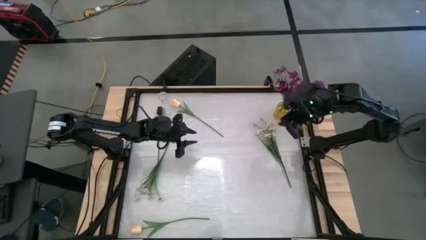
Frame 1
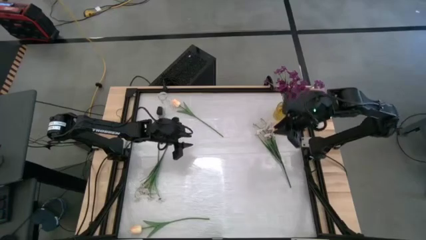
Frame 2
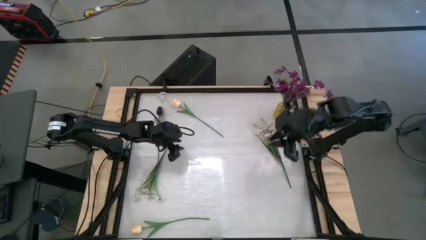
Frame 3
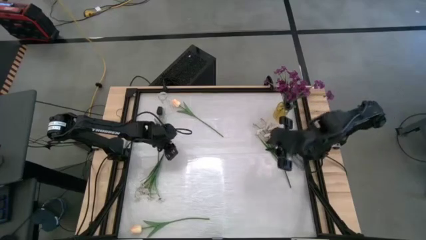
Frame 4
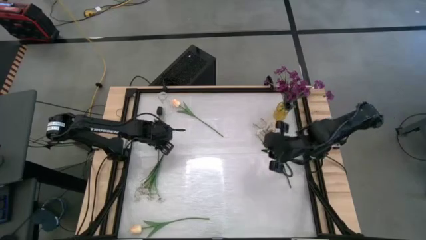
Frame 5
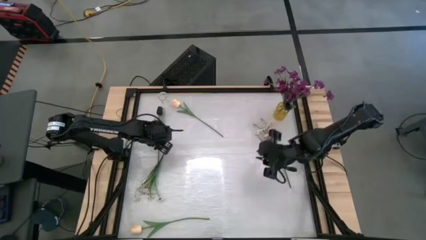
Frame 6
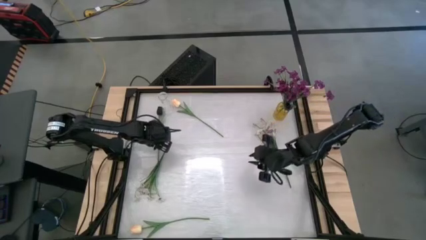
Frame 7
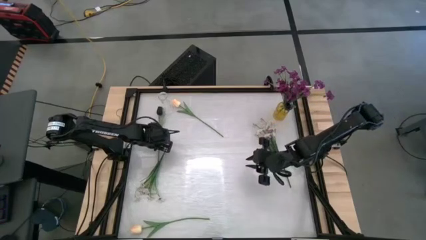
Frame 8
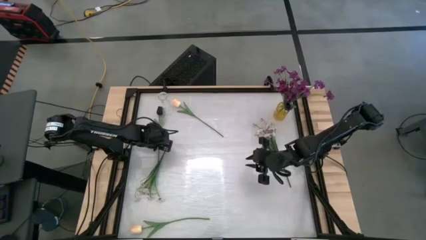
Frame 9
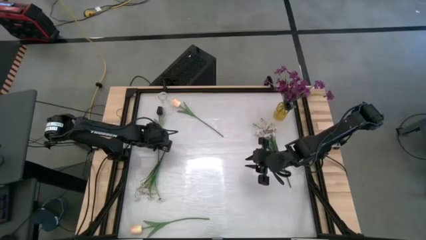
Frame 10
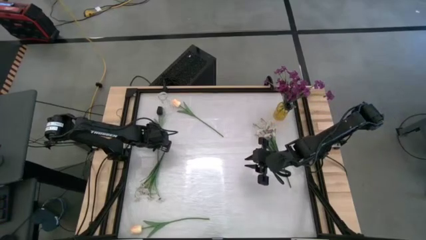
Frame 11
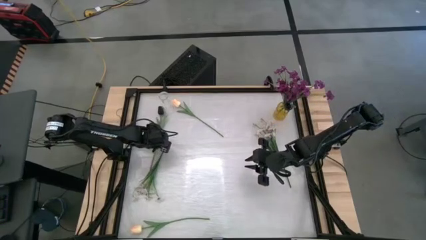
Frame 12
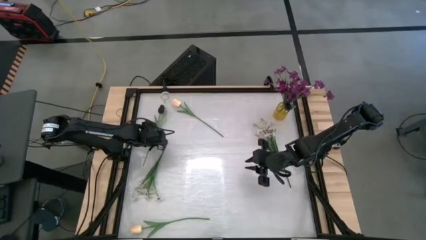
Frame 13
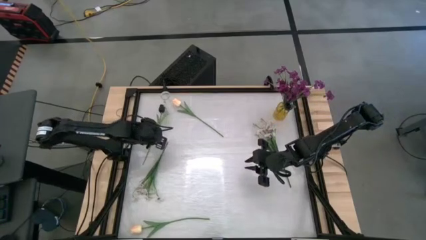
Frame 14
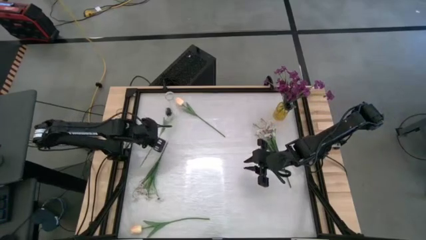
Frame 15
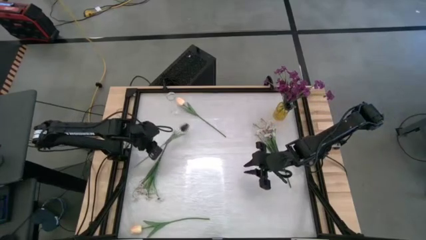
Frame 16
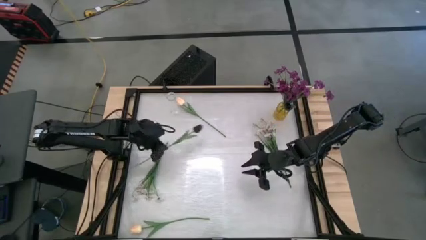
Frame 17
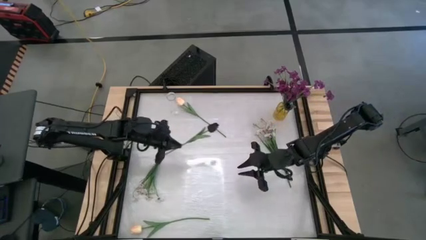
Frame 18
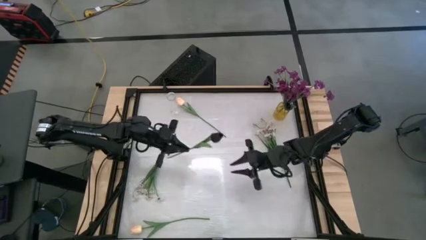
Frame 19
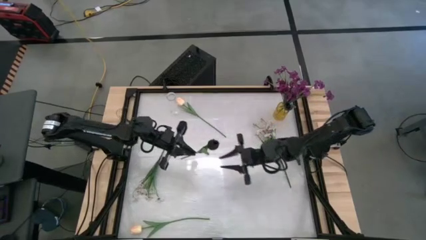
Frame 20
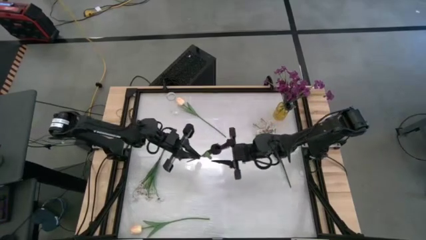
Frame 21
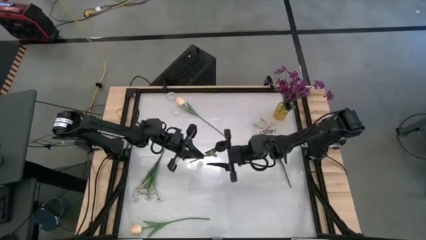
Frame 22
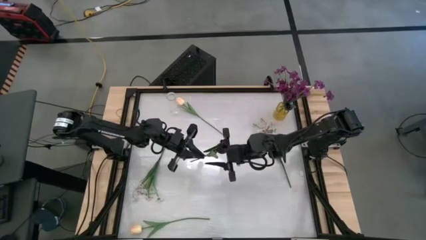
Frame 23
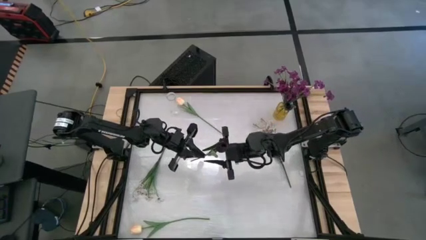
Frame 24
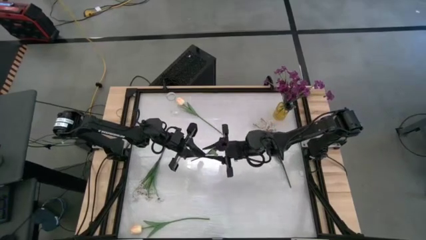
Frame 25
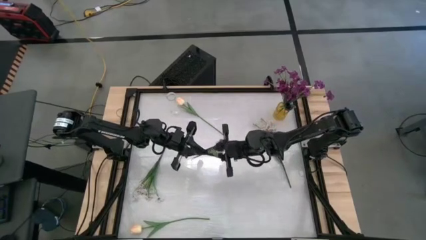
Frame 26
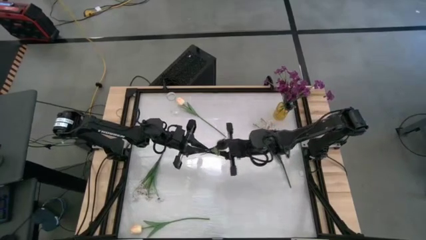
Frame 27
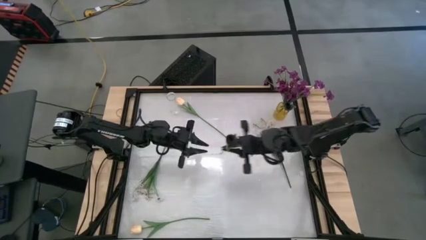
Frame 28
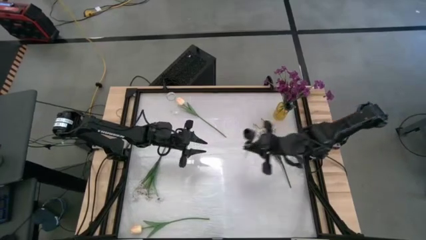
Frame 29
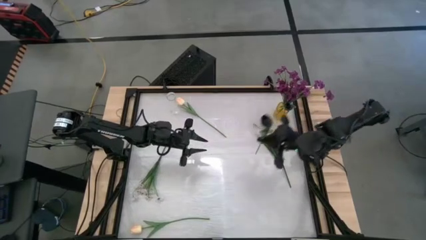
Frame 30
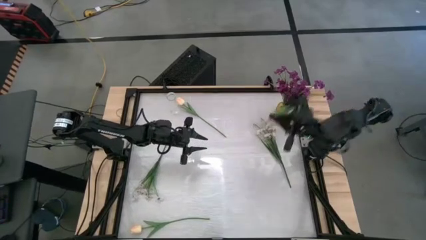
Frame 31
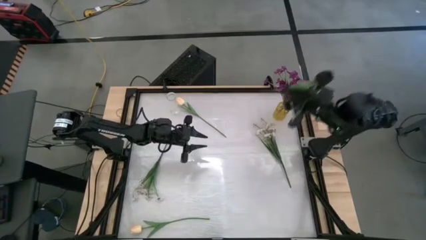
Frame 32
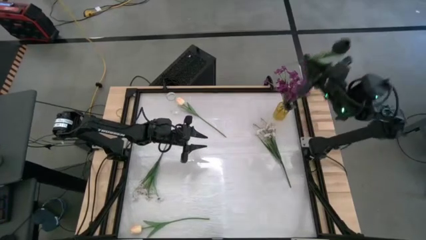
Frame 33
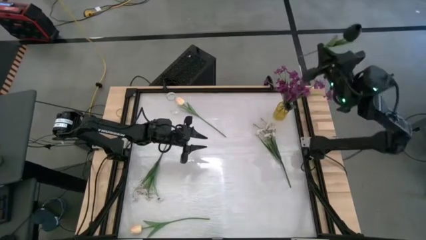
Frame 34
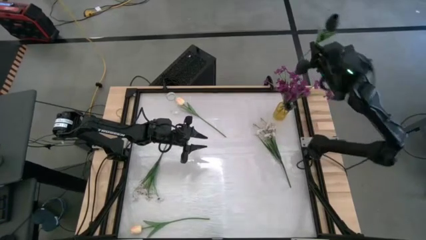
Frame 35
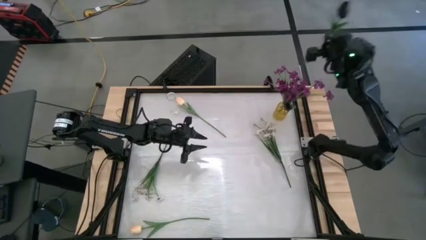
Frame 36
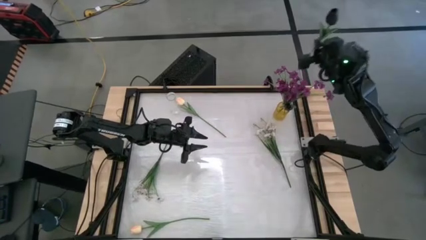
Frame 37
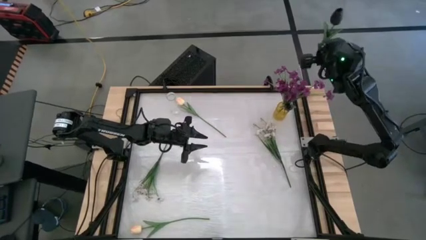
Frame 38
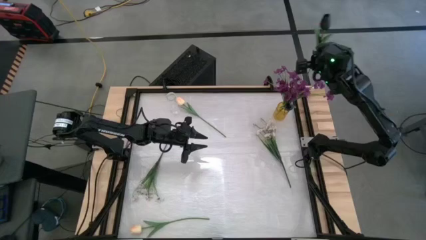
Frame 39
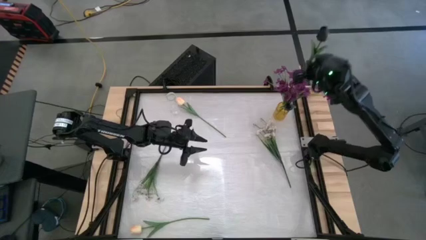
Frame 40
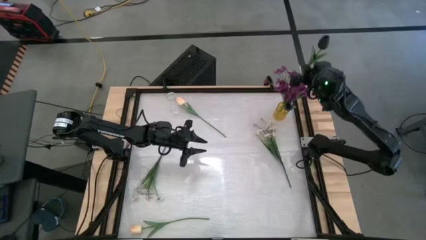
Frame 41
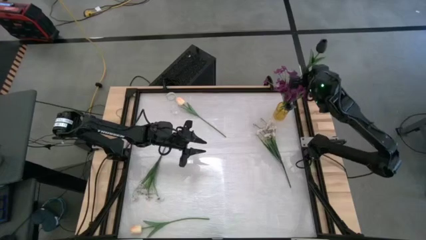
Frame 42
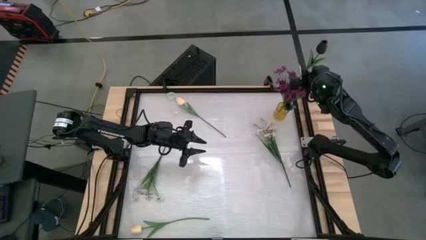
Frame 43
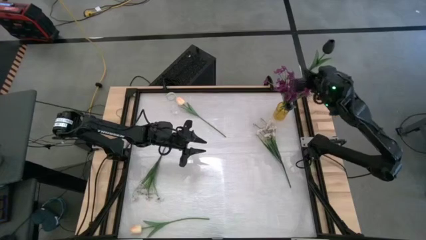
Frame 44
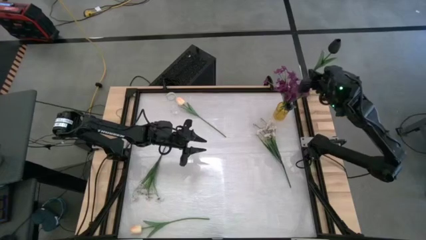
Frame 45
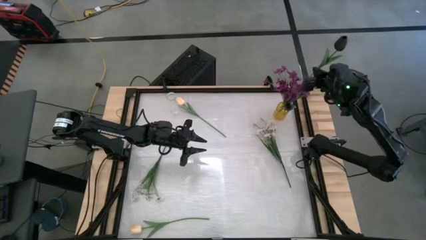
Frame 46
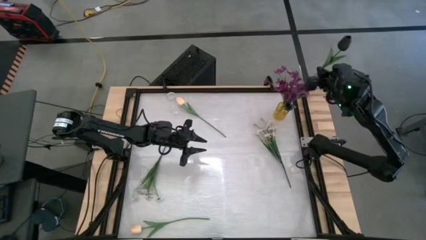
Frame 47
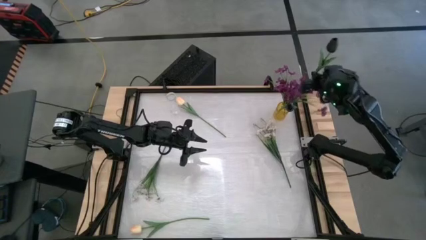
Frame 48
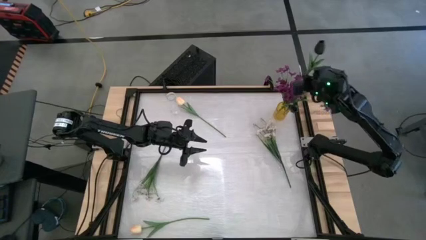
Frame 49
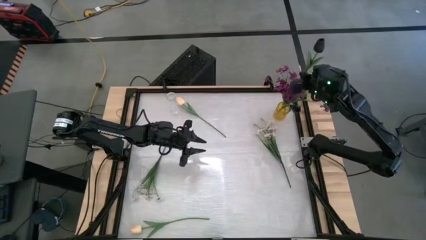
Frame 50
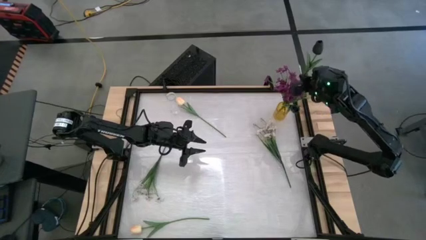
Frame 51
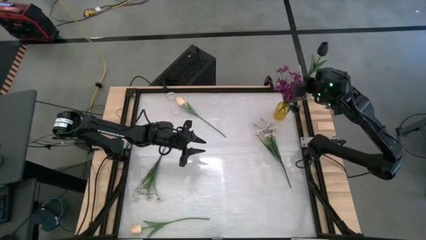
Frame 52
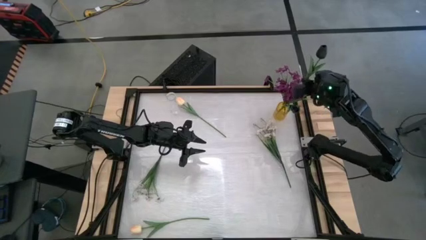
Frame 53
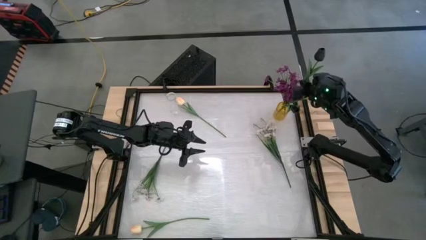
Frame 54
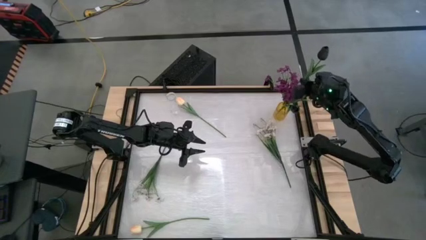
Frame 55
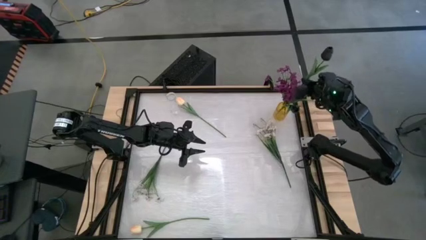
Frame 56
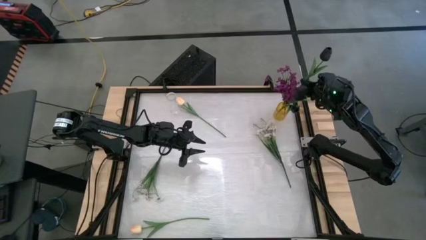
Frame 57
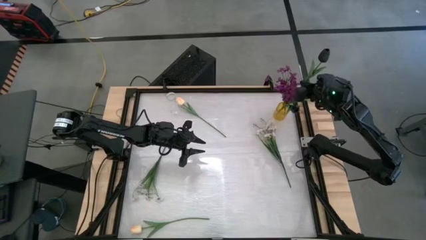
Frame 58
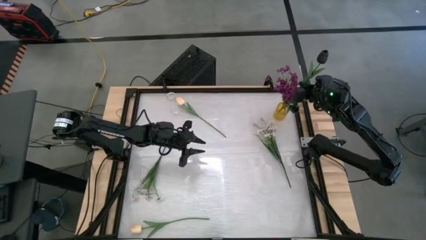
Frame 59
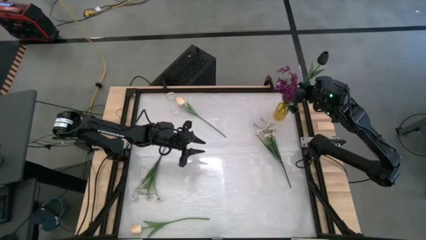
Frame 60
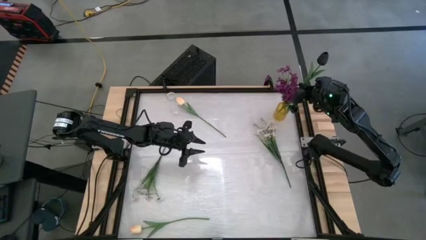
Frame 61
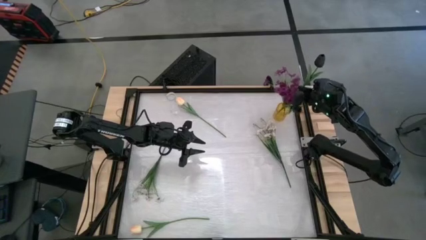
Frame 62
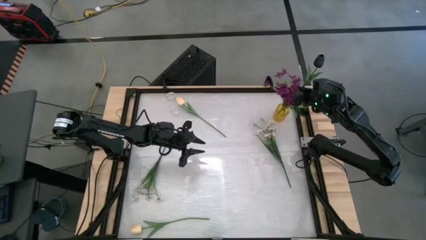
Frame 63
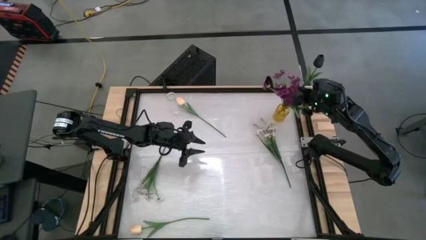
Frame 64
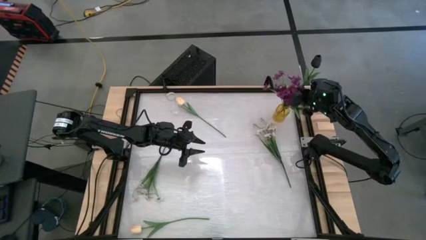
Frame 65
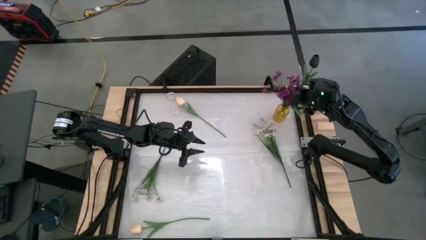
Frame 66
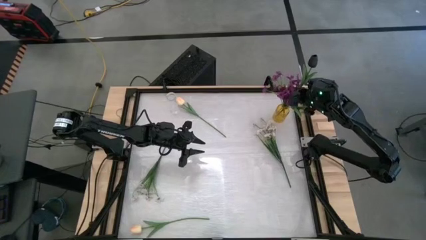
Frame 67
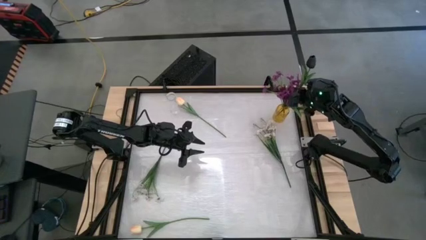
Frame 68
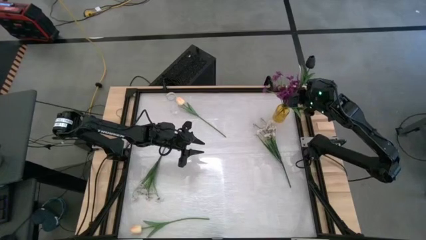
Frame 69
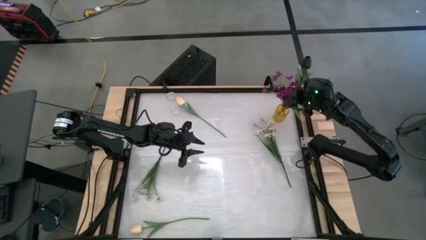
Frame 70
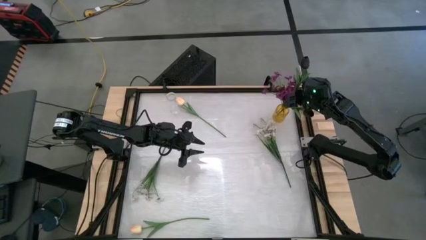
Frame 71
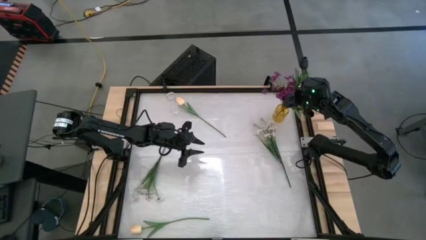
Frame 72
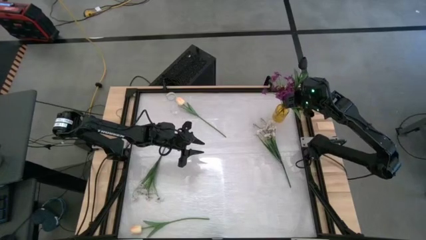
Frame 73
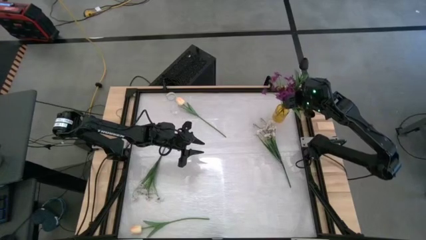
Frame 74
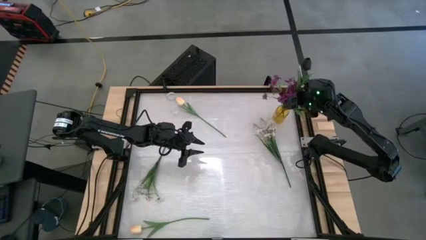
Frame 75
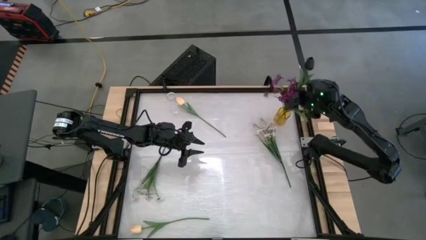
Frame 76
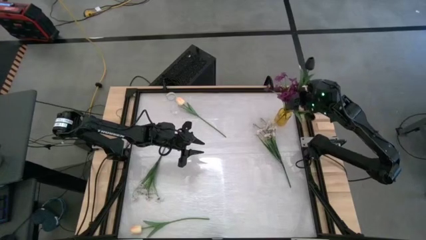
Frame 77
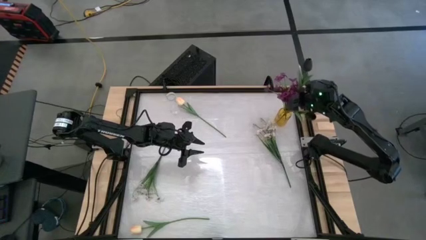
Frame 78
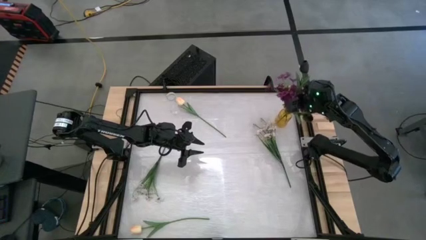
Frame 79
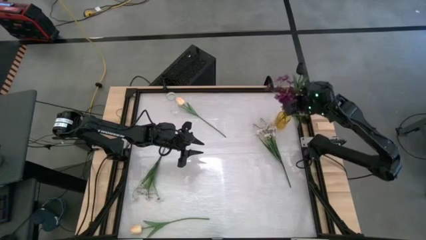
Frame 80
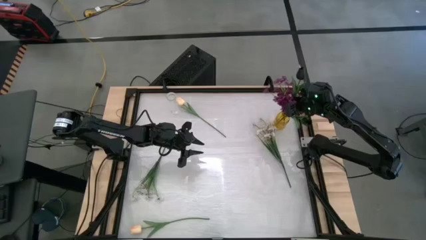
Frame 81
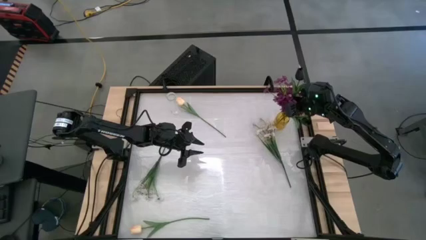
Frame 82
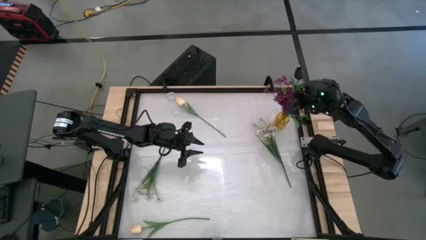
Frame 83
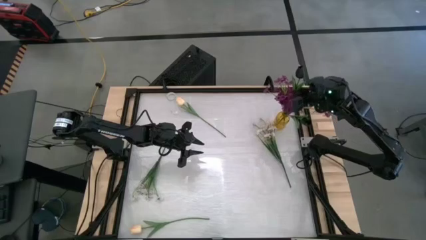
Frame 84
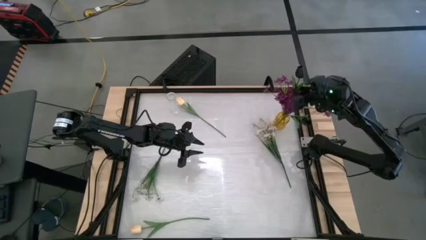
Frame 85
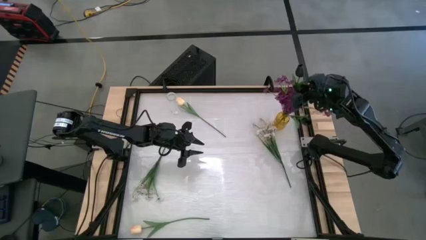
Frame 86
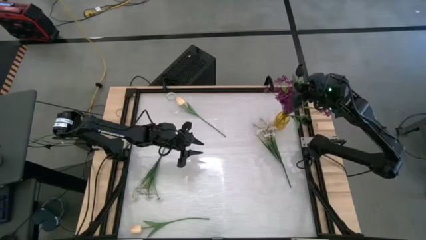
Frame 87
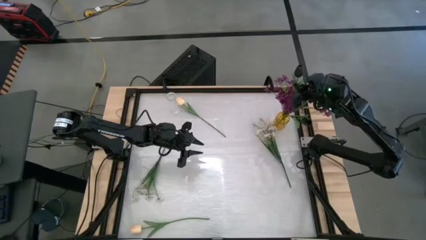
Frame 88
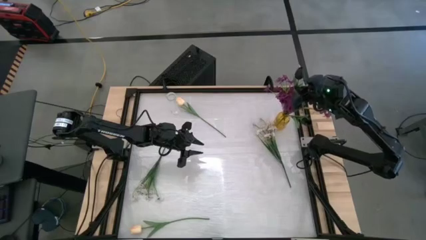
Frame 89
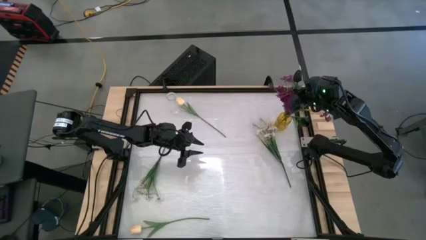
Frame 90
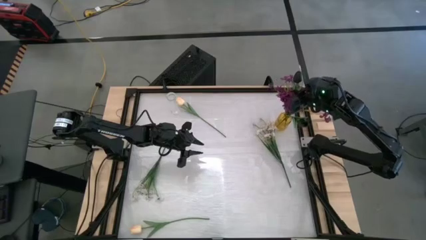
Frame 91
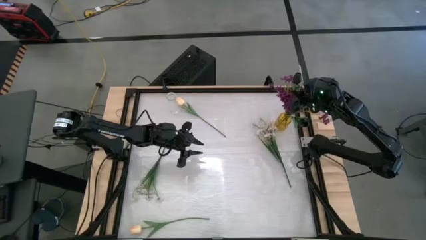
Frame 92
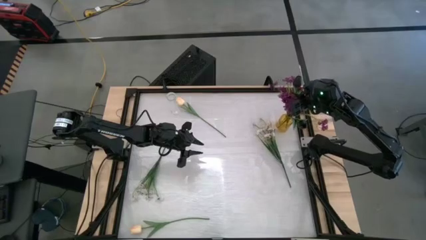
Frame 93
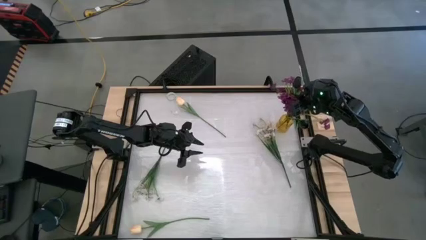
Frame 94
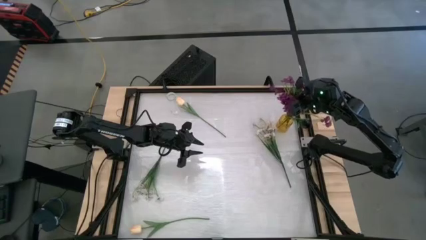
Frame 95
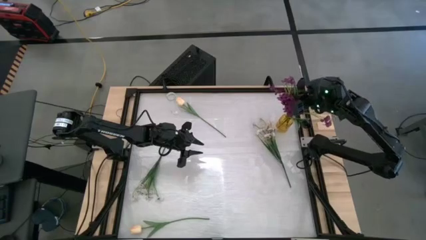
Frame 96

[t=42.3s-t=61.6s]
Task: Sort flowers into vase by color
Put the black tulip into the yellow vase
